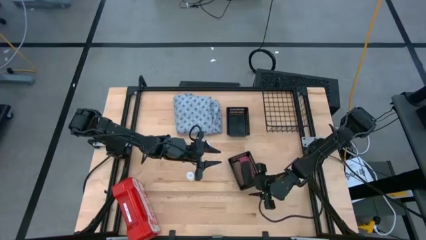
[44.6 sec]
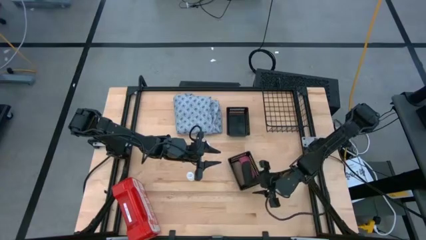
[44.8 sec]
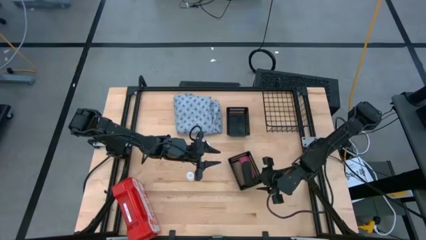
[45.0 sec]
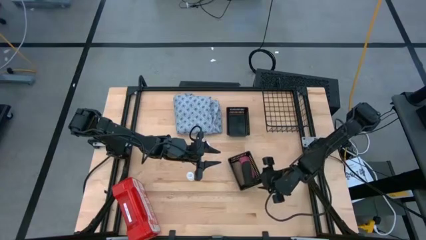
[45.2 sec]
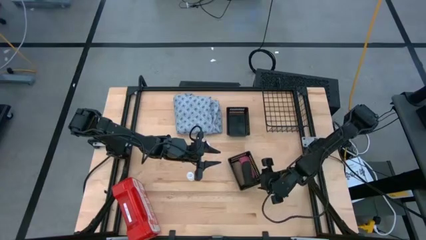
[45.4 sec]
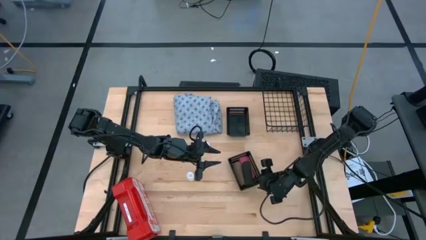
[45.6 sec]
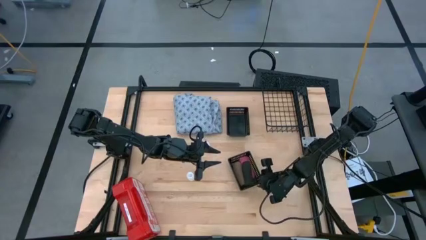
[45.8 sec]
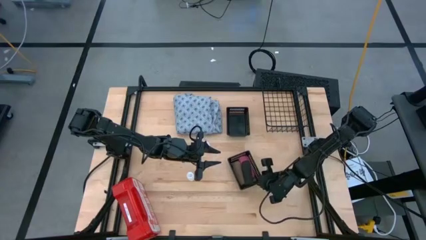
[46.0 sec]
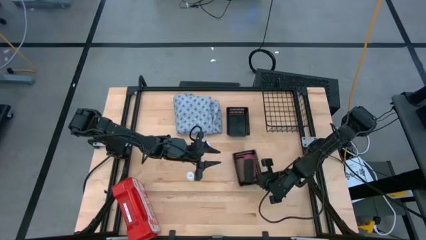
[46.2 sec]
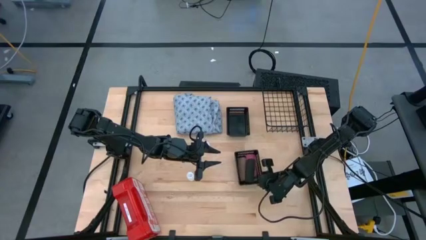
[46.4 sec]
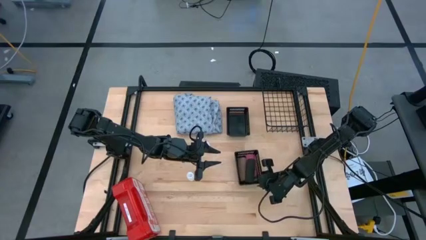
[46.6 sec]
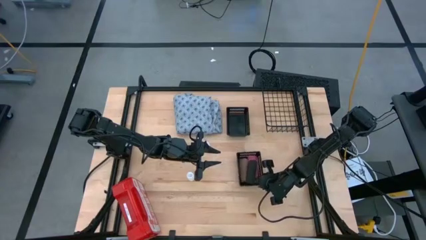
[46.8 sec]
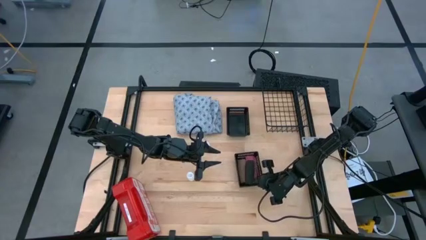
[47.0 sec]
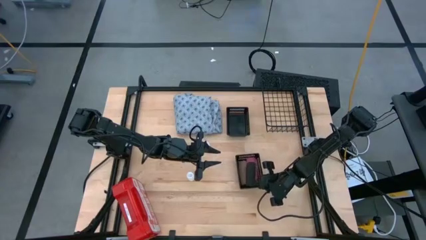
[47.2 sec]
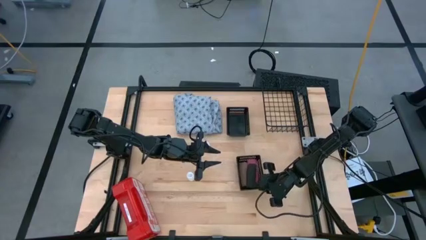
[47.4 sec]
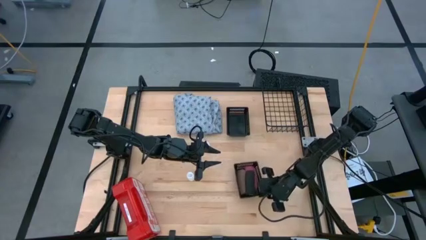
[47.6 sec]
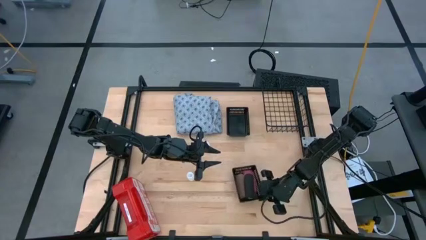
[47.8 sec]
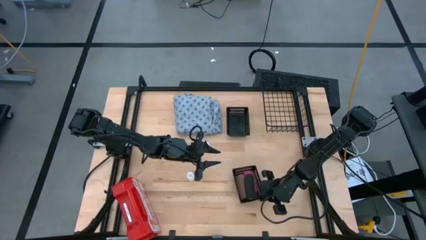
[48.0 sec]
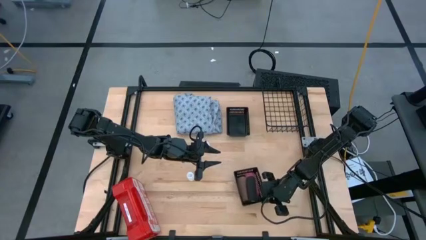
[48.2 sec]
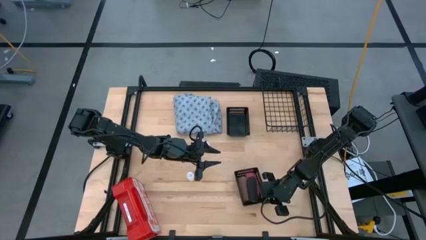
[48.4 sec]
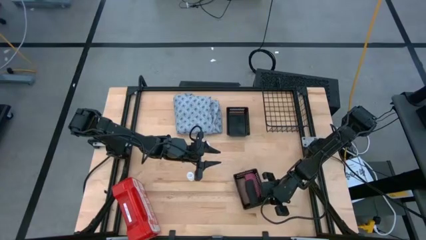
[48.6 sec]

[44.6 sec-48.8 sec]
Task: Pick & Place Medicine items
Adjust the bottom black basket

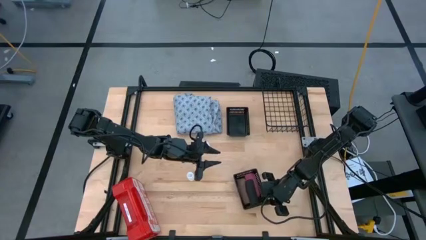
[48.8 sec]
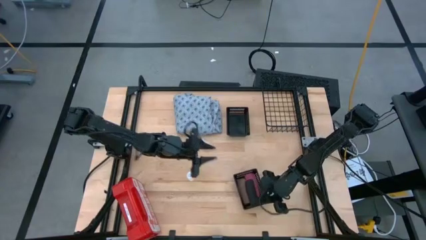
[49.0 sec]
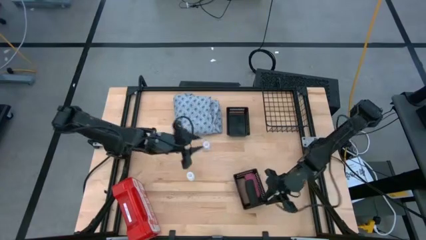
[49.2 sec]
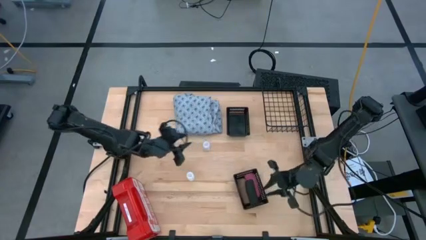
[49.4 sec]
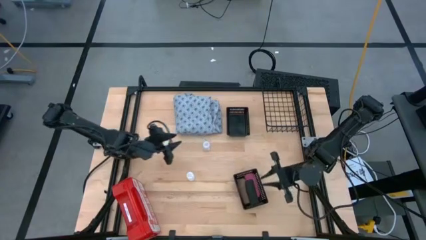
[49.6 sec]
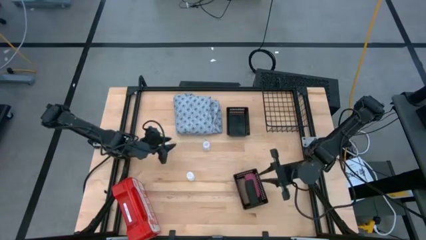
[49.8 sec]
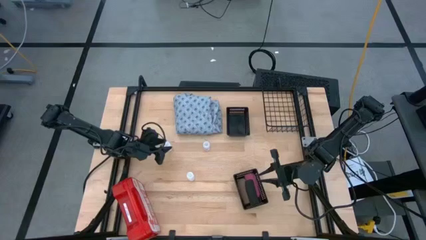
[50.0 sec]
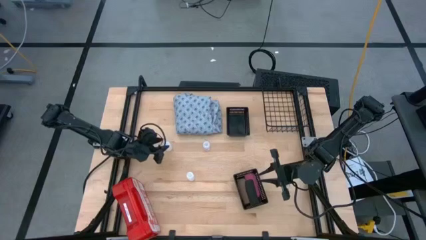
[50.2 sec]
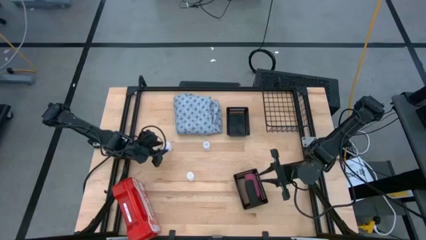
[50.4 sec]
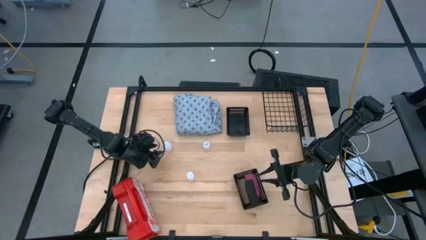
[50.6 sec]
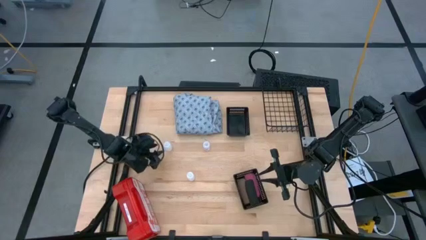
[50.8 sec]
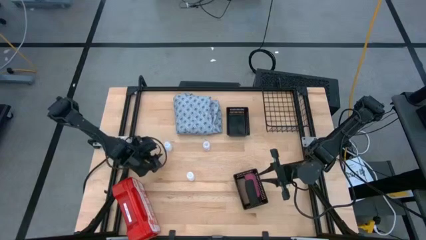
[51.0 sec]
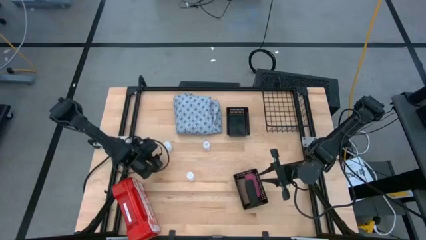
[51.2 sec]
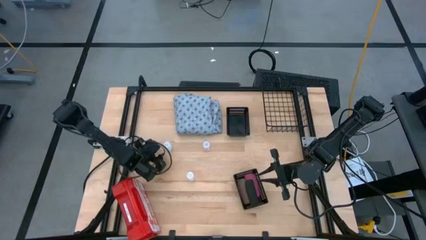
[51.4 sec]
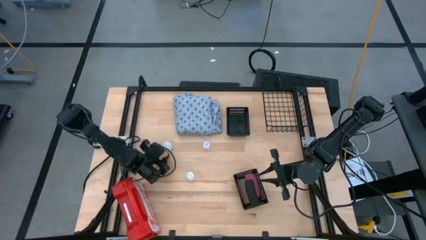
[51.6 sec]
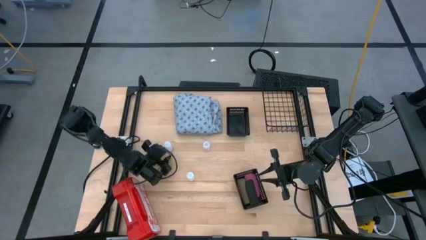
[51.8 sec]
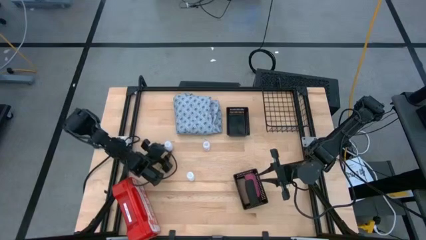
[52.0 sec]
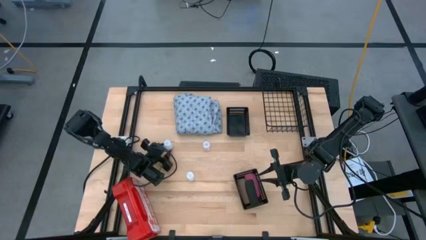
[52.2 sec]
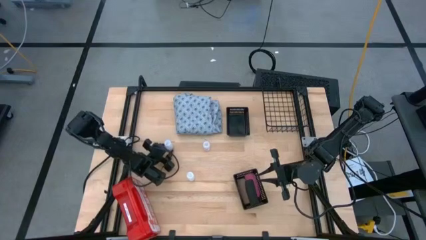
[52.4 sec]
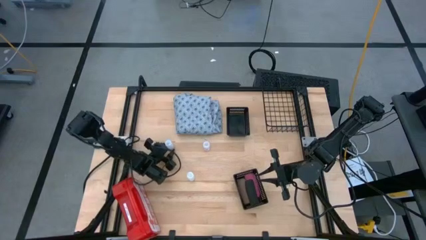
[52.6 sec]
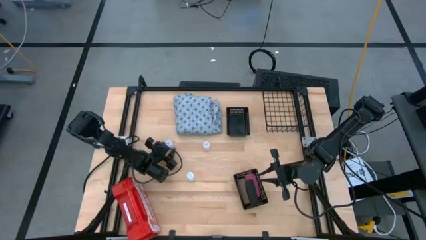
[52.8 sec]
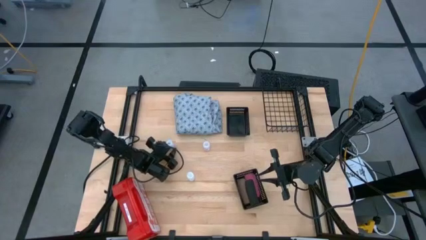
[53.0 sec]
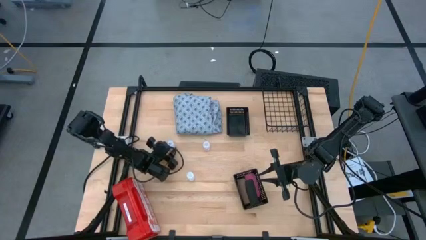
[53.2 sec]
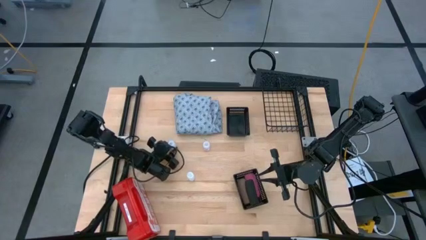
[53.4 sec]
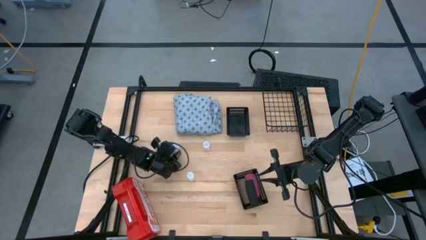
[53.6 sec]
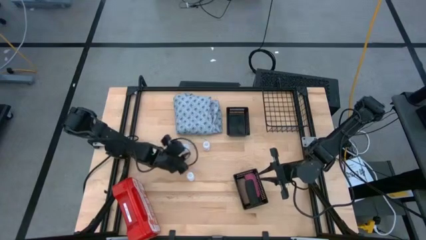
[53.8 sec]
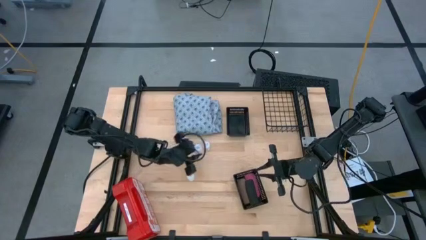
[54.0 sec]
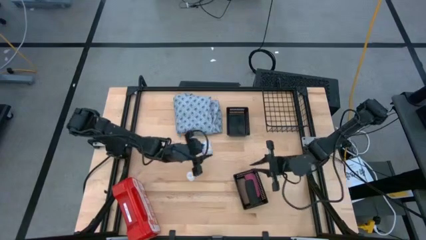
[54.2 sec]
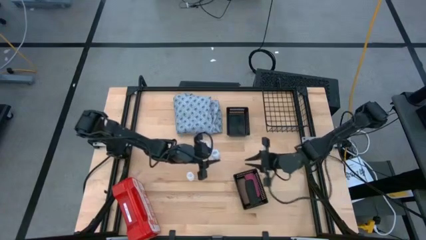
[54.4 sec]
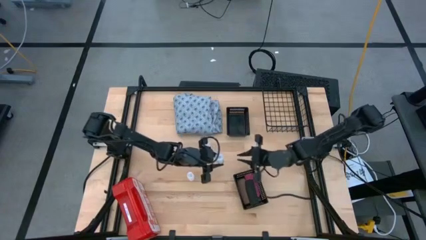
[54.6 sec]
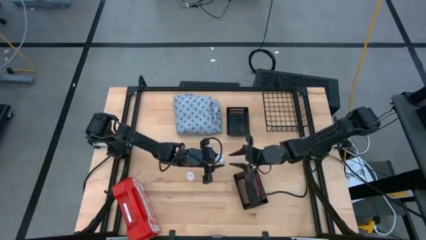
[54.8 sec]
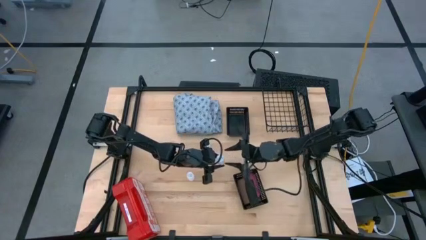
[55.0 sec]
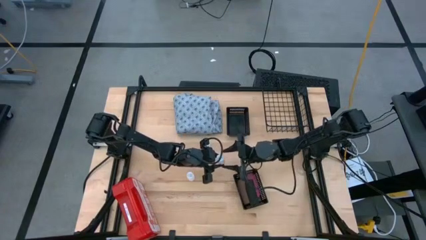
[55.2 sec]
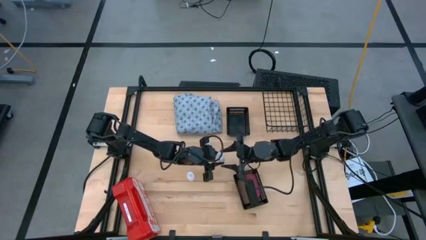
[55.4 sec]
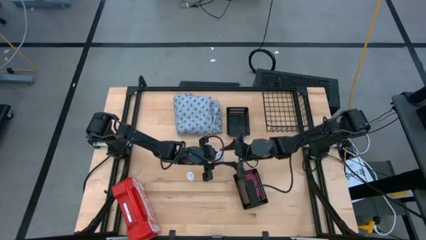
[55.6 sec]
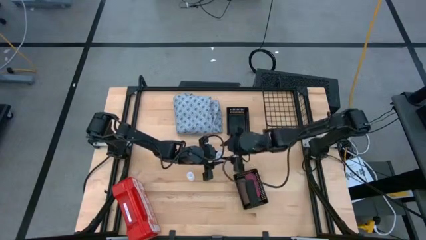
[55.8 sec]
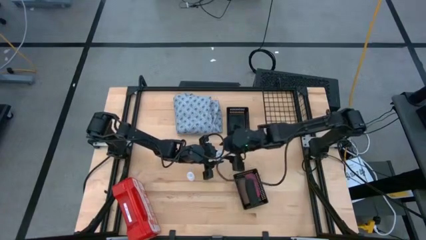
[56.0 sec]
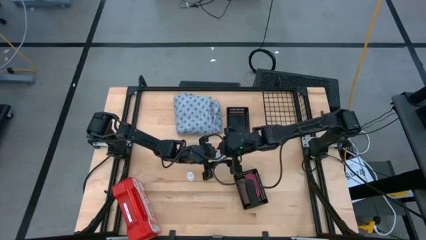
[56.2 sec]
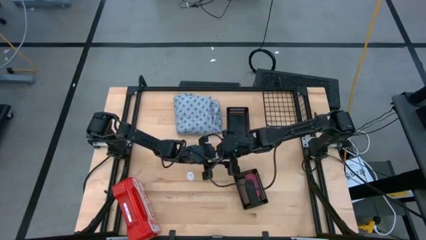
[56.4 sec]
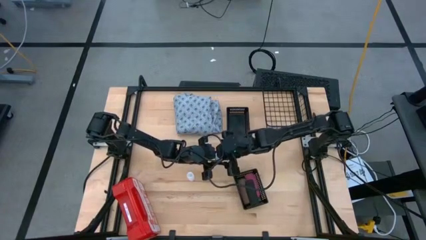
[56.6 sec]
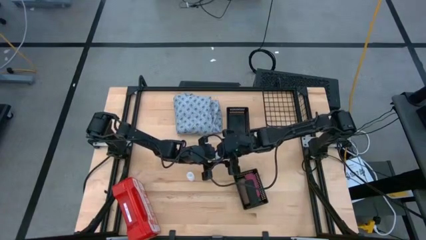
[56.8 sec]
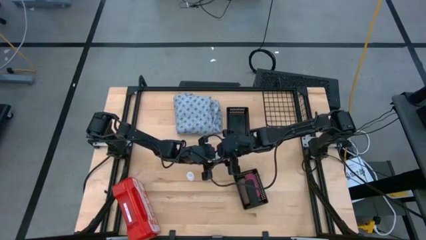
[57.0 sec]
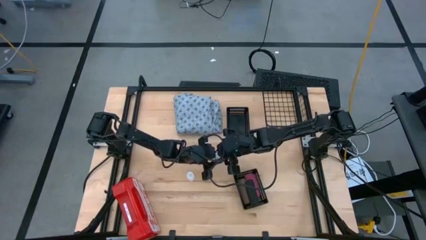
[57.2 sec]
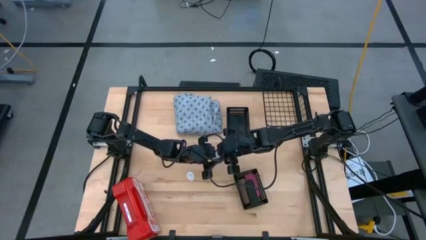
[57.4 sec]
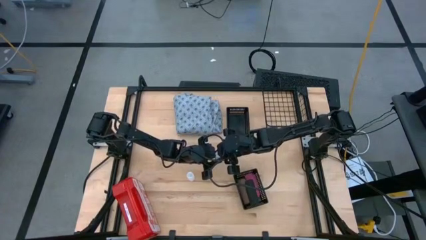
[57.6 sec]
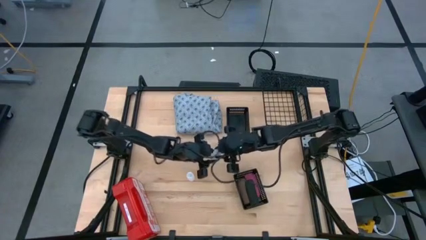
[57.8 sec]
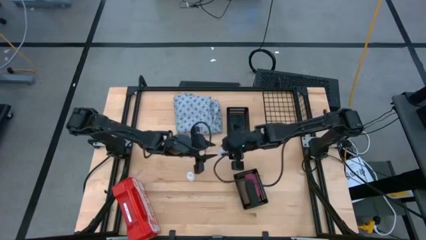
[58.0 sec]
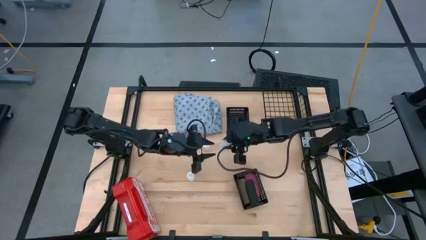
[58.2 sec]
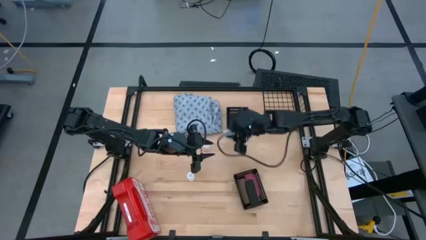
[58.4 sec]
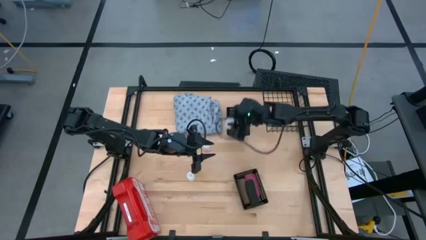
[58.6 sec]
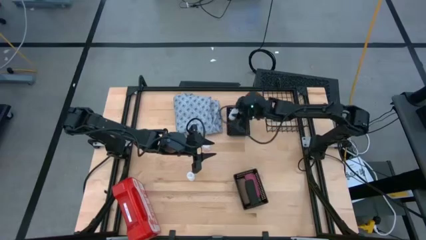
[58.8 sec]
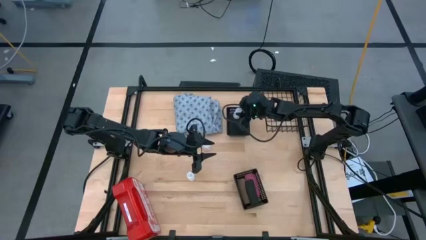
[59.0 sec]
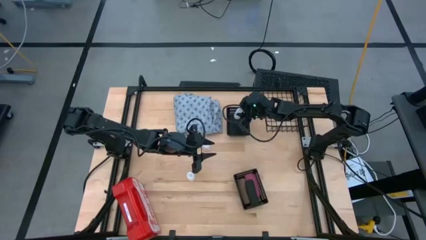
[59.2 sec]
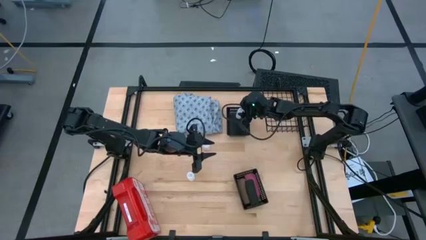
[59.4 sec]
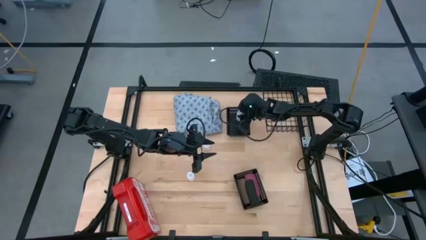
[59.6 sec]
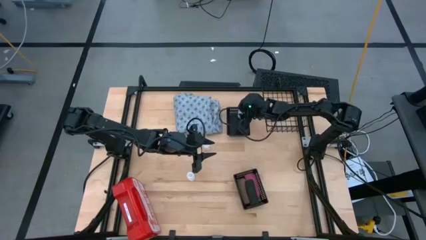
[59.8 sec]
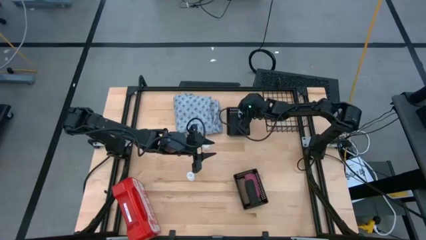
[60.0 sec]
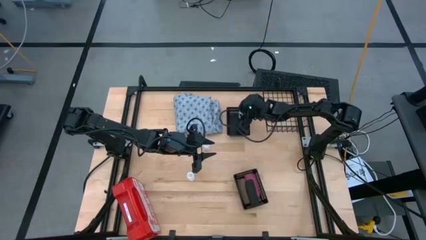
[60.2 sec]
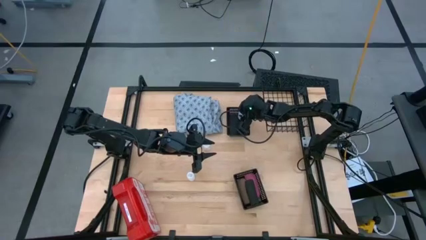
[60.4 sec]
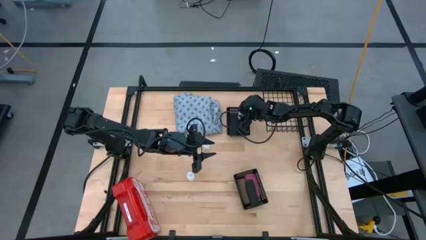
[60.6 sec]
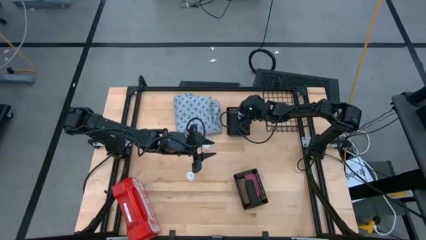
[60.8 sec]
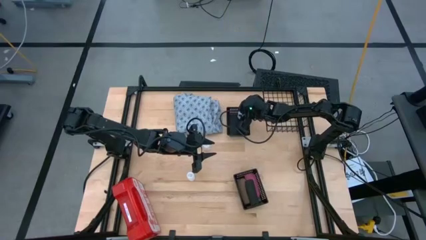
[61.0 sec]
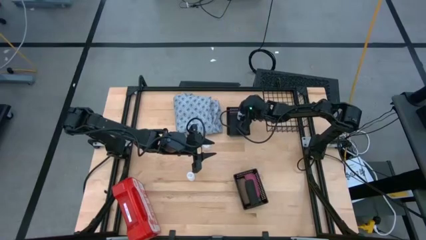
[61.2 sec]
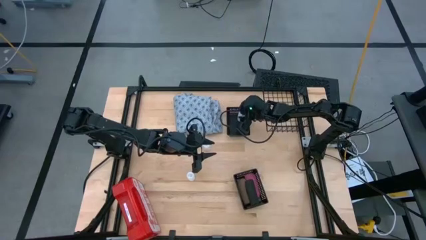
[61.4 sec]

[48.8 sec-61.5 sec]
Put the top left transparent pill bottle into the top black basket
